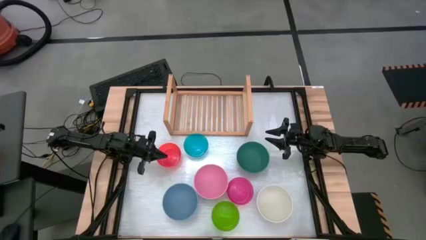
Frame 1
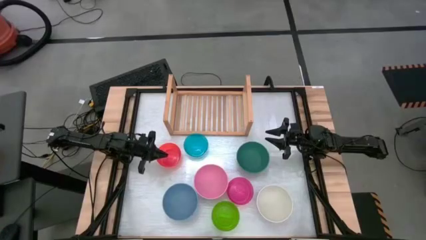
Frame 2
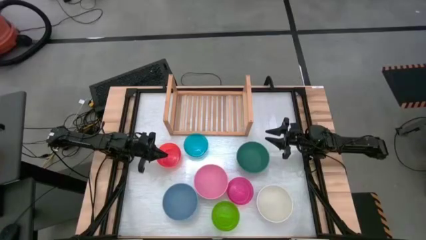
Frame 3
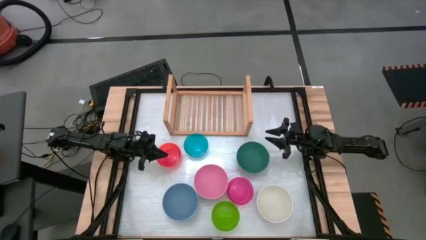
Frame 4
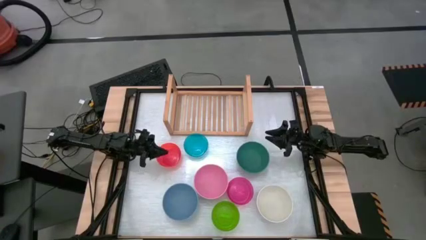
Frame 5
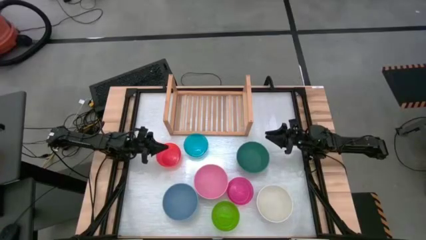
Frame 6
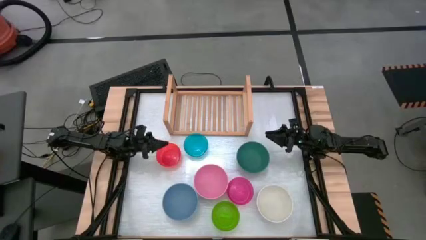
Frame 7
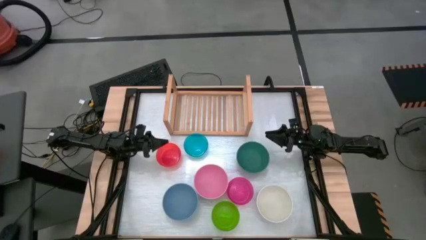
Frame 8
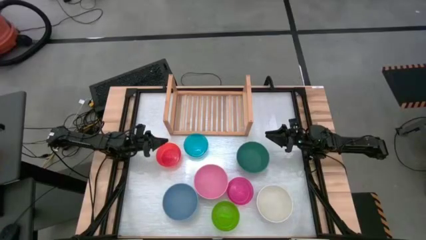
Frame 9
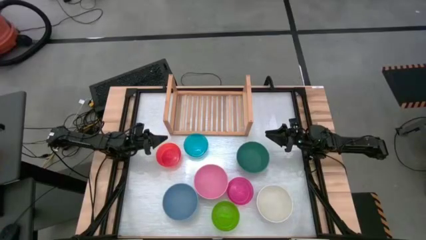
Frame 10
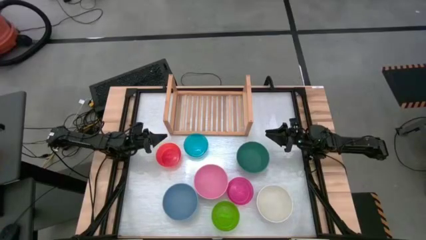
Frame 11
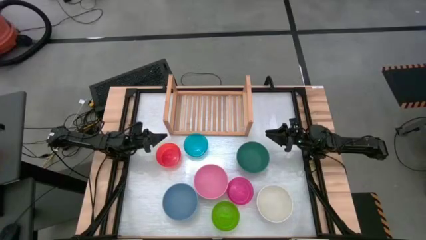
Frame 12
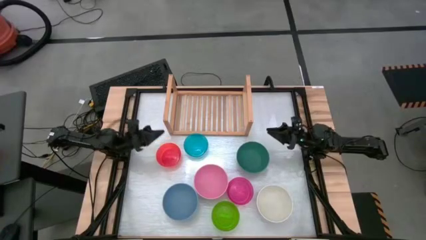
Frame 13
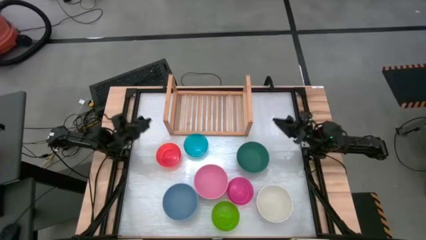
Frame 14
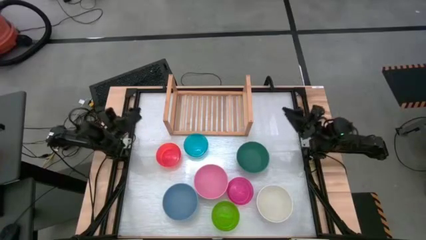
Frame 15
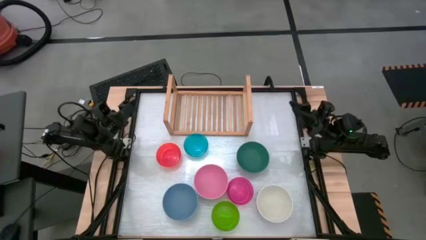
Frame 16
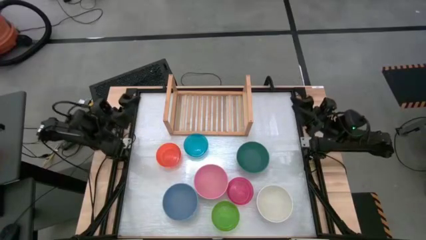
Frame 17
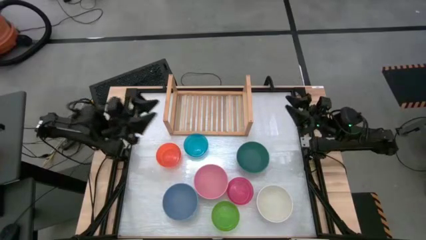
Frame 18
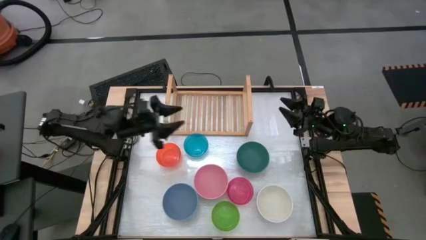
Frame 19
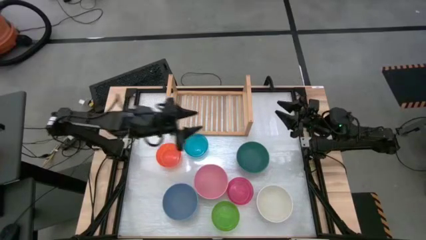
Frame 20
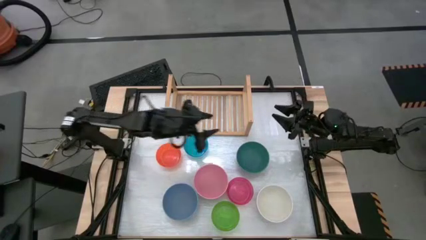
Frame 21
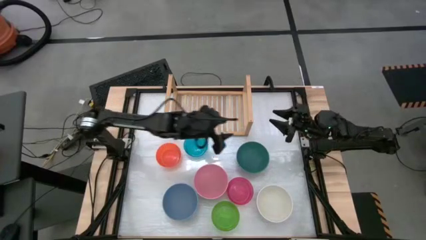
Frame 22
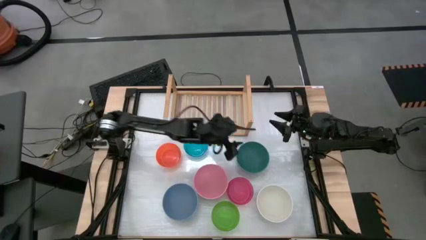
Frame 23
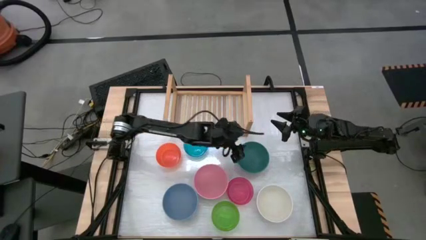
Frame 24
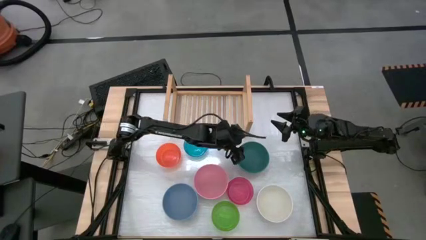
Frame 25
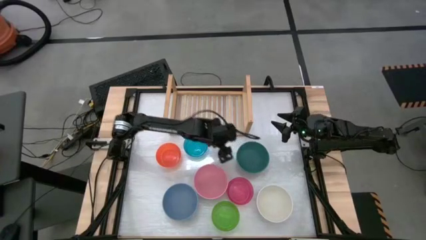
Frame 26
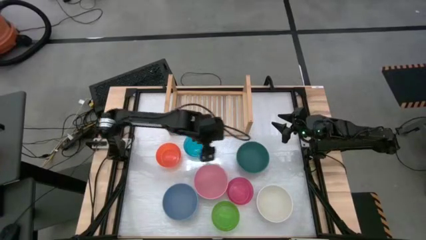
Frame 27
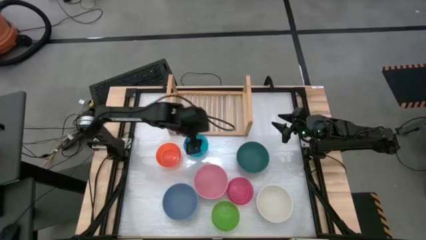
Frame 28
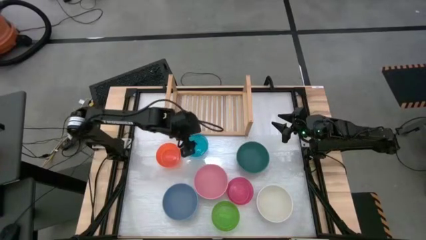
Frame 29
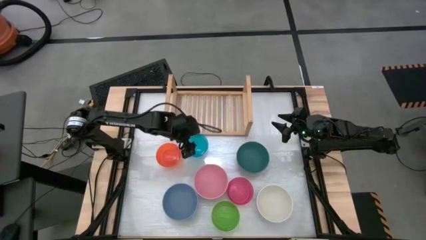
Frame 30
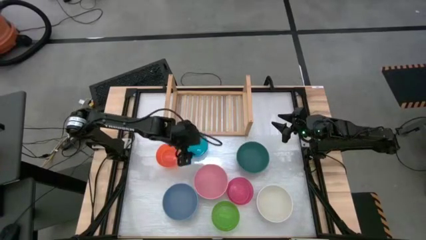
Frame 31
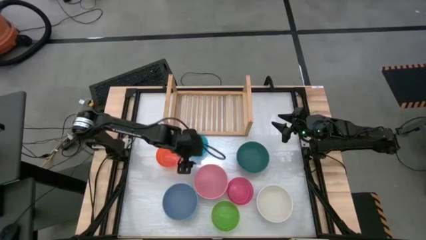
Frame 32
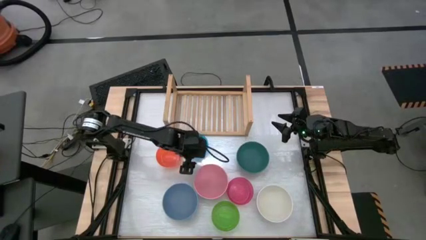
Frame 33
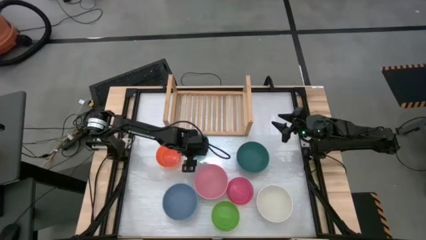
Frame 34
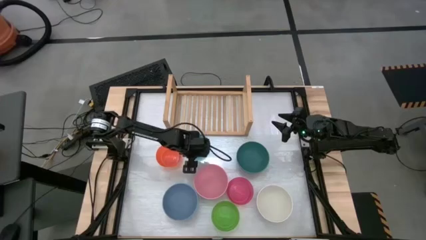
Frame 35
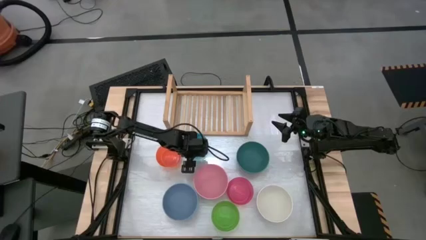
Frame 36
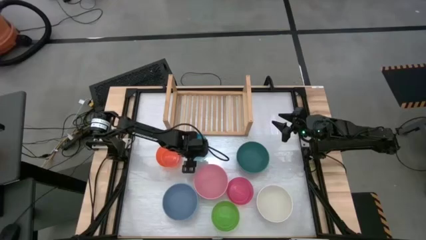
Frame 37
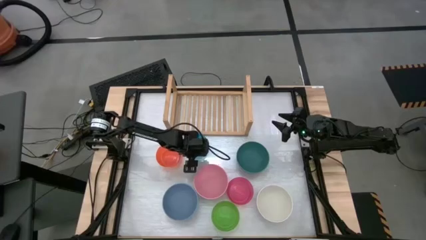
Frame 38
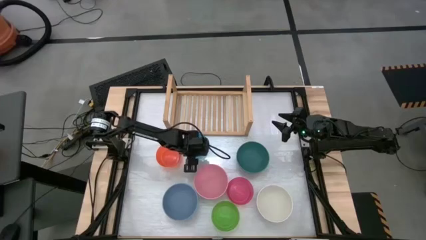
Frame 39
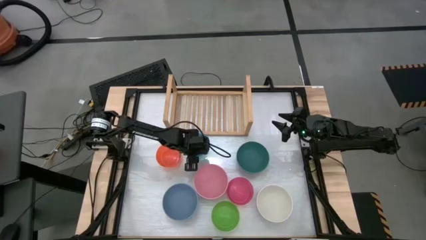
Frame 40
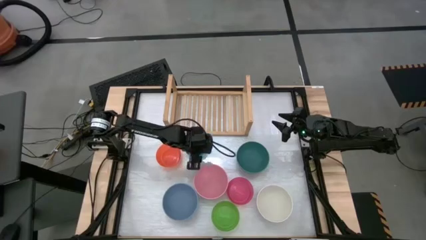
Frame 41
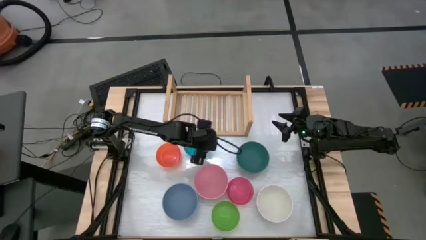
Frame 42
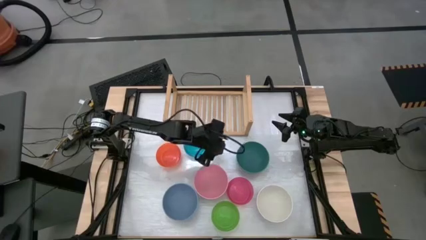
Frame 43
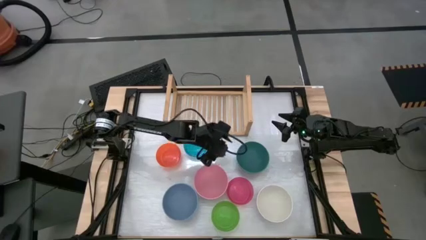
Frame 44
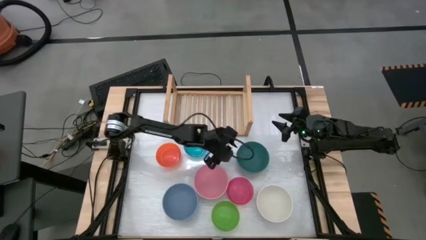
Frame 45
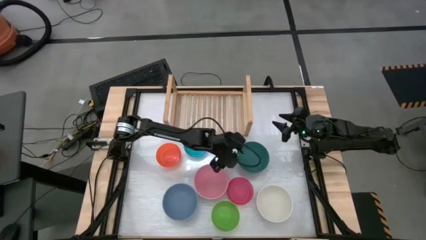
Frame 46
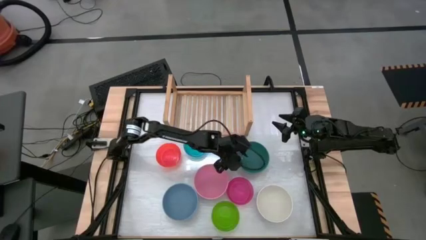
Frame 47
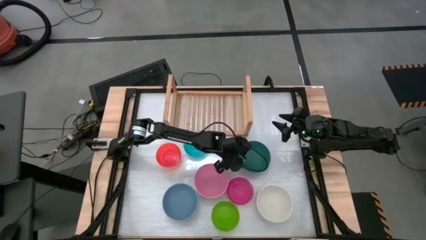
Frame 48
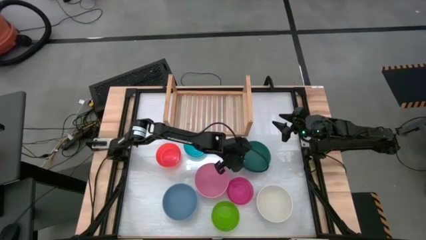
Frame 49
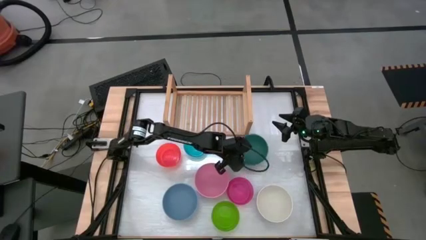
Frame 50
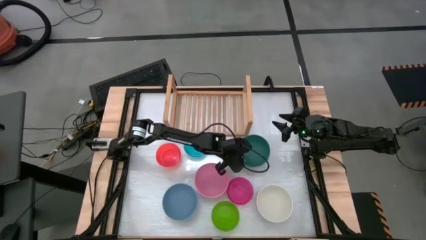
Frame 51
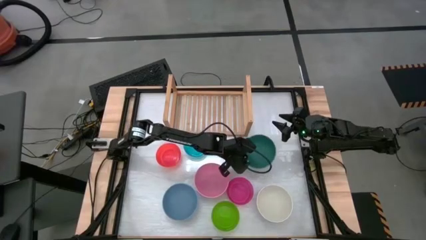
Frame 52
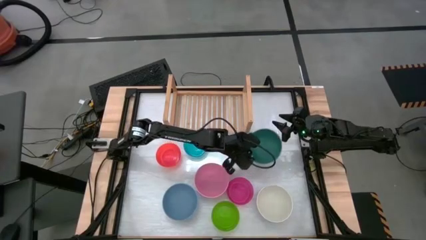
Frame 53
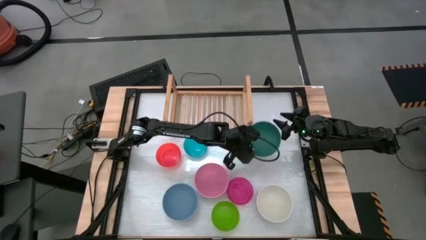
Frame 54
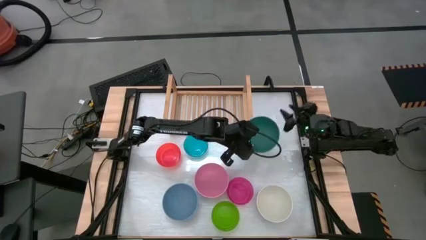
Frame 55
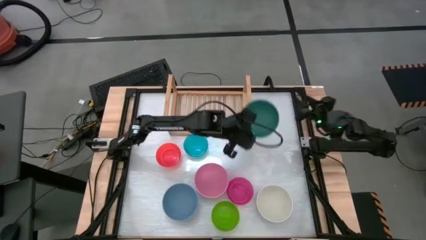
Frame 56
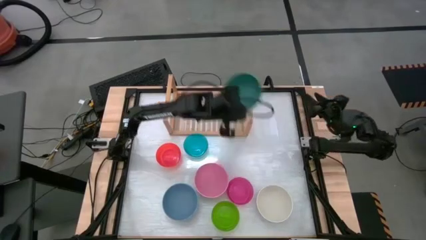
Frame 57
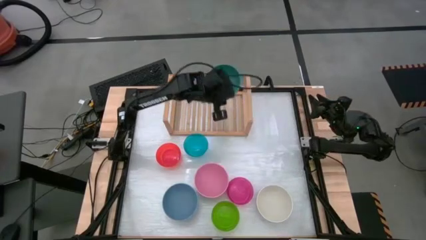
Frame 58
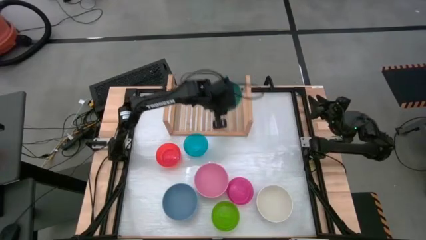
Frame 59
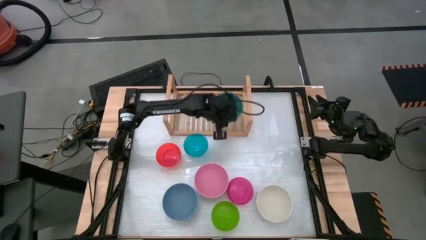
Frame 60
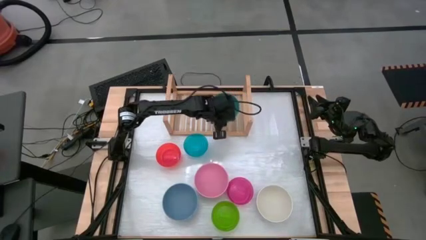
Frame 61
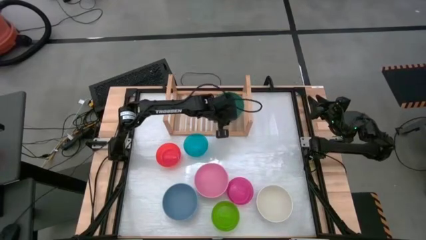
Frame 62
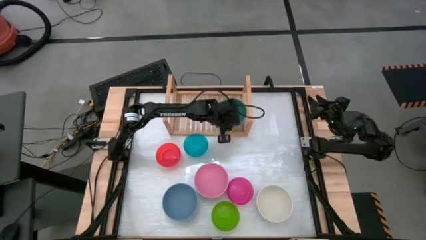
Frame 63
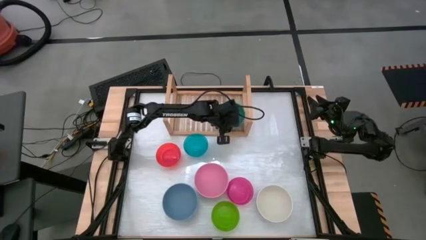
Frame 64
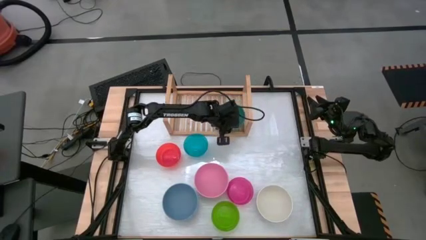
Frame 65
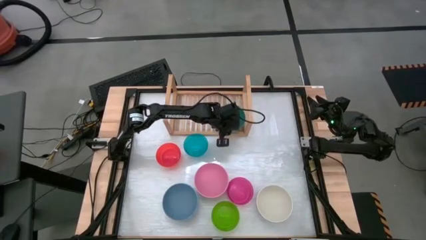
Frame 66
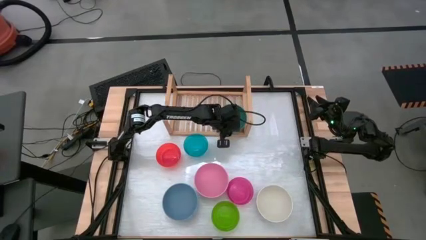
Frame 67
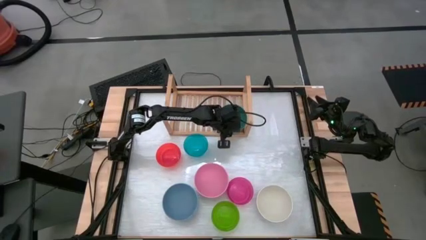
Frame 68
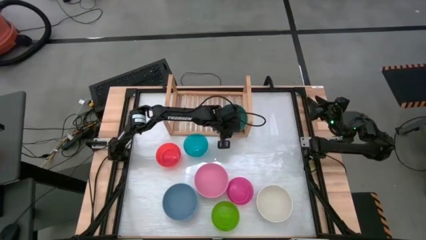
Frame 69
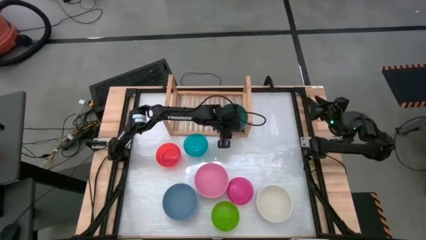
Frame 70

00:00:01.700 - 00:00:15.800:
Task: Place and stack bowls onto a shelf
Put the green bowl on the shelf

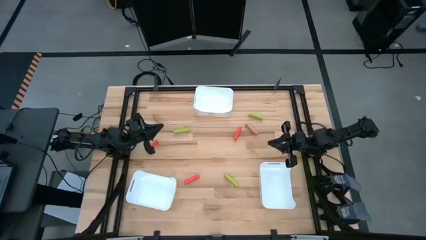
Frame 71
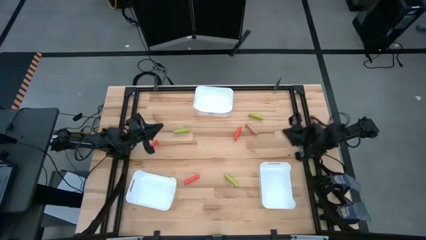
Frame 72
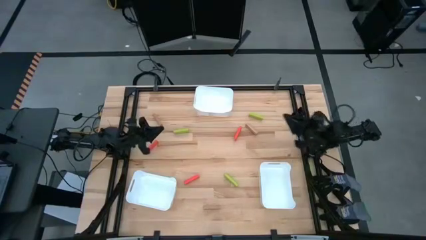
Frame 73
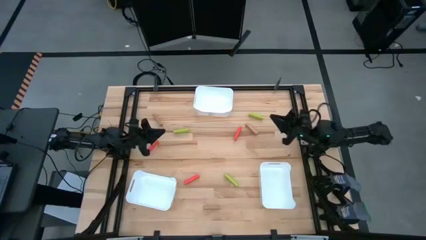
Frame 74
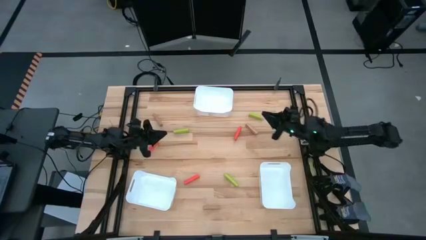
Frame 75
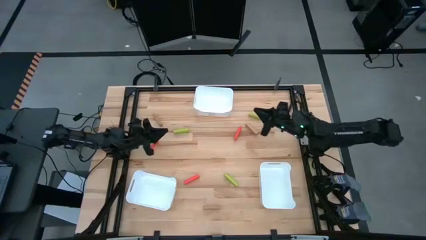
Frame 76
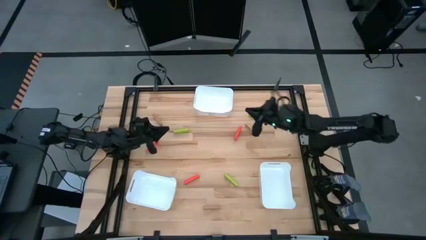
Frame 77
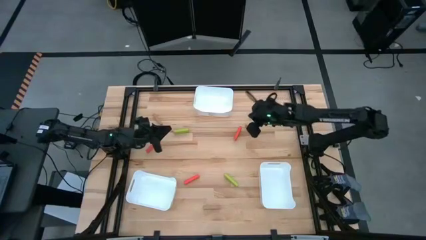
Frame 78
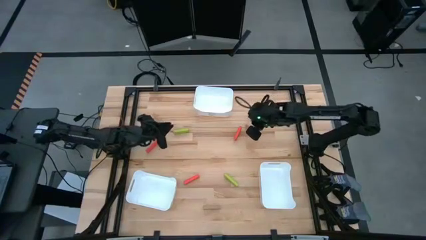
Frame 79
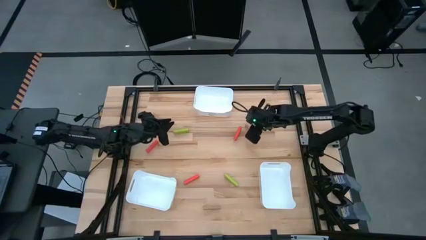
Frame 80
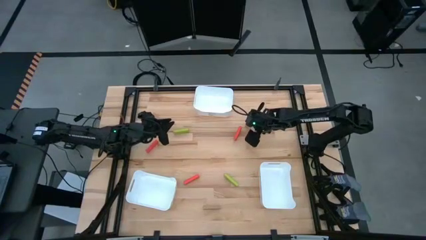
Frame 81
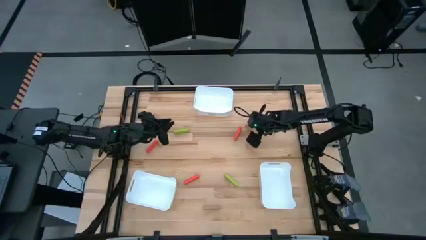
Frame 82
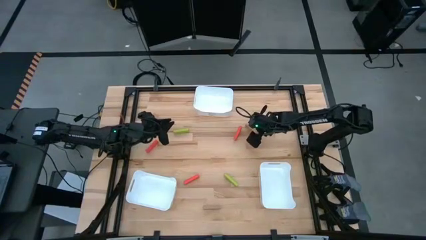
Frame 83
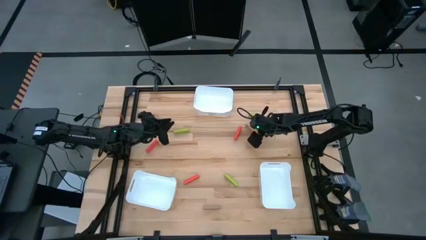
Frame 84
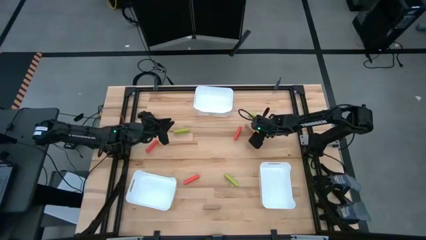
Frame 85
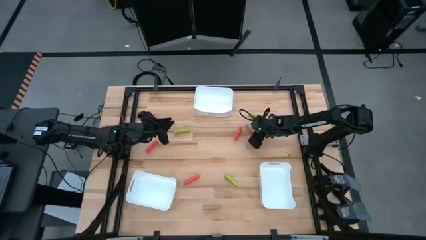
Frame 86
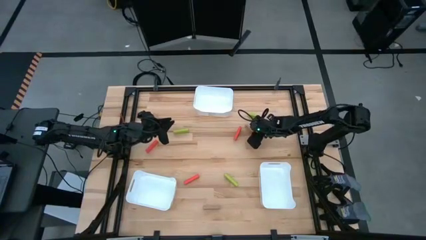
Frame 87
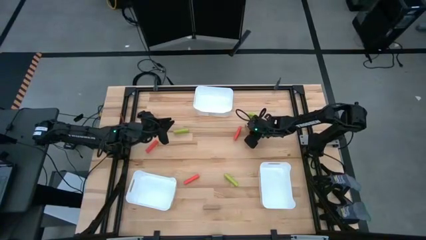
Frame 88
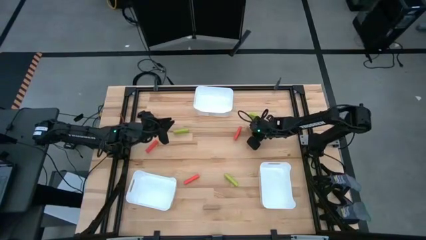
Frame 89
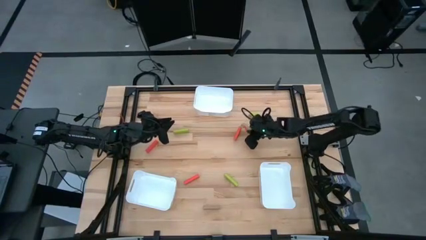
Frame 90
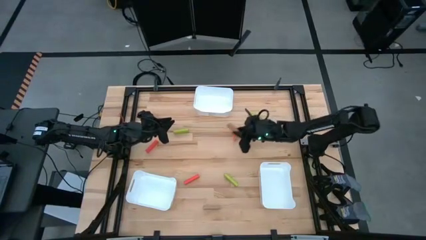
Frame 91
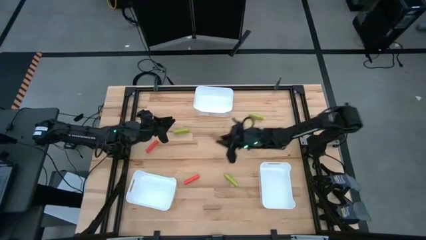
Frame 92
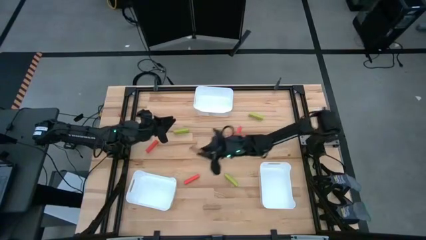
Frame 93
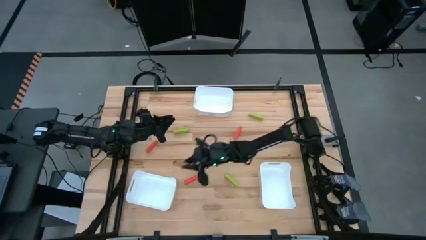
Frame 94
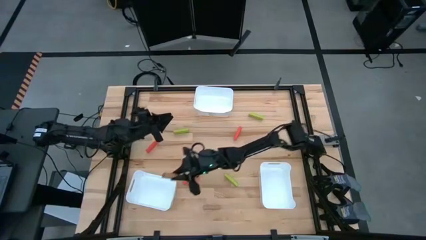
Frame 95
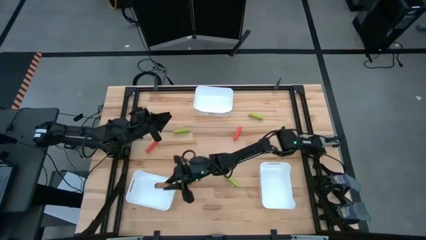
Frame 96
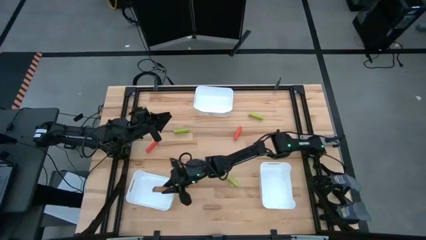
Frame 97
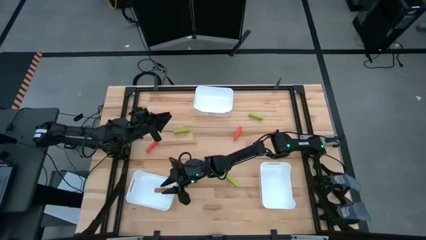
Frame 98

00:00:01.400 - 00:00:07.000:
Task: Sort blocks
Put the top right brown block into the bottom left white bin
